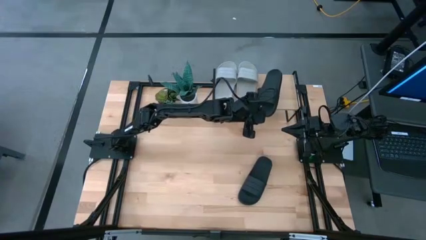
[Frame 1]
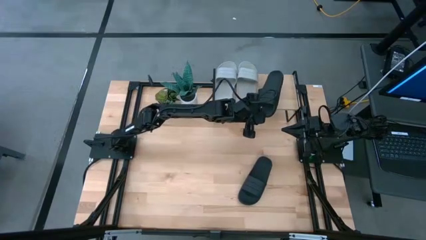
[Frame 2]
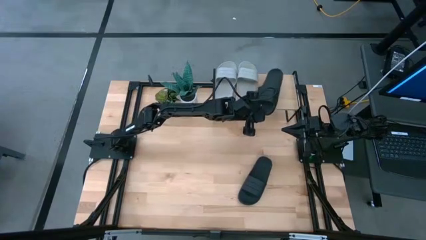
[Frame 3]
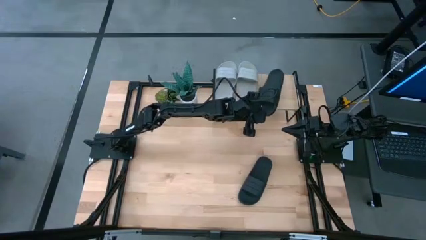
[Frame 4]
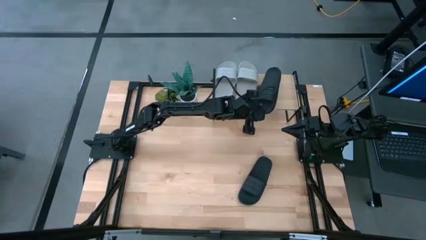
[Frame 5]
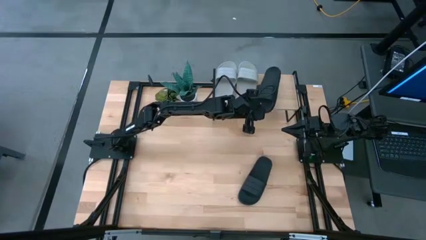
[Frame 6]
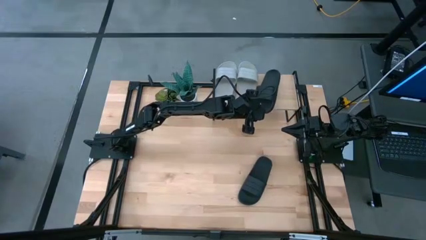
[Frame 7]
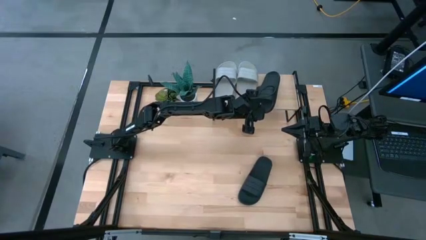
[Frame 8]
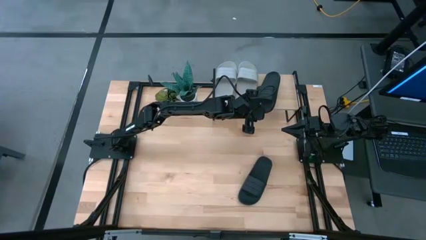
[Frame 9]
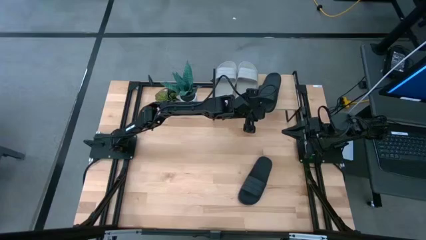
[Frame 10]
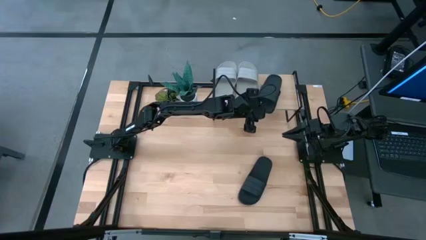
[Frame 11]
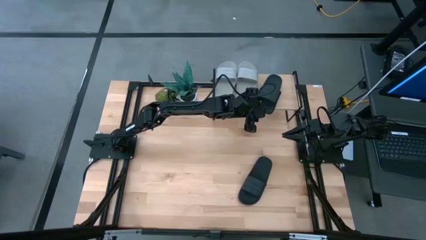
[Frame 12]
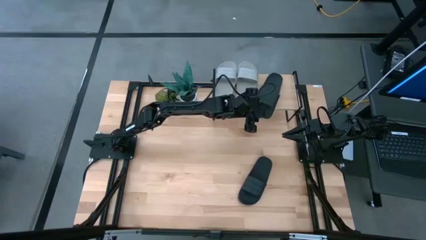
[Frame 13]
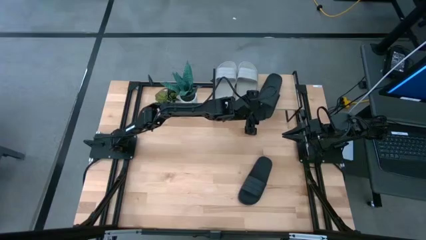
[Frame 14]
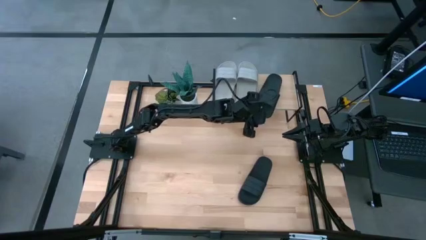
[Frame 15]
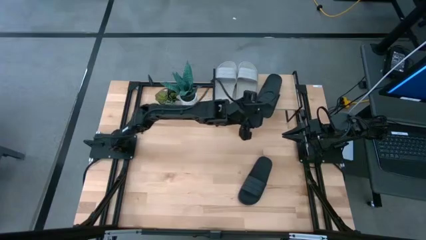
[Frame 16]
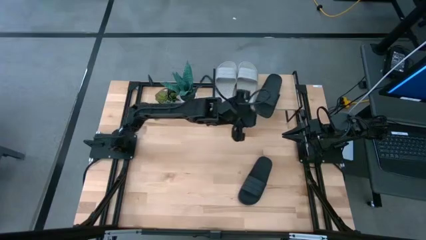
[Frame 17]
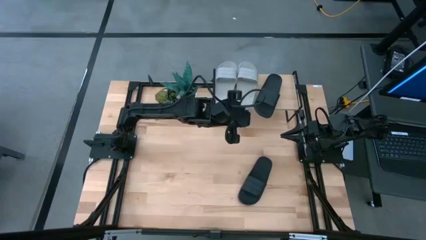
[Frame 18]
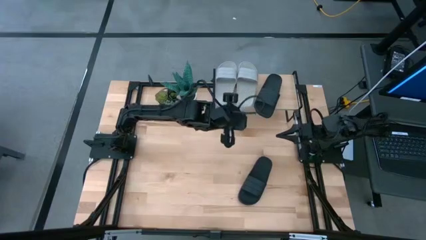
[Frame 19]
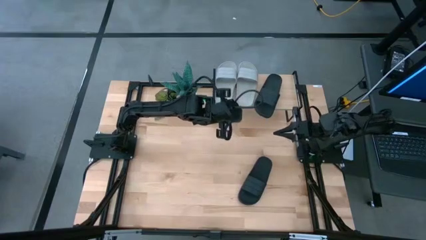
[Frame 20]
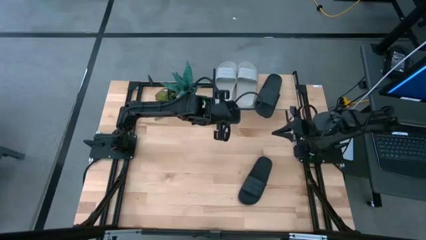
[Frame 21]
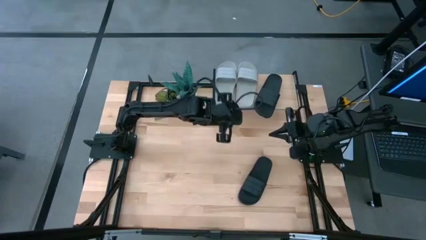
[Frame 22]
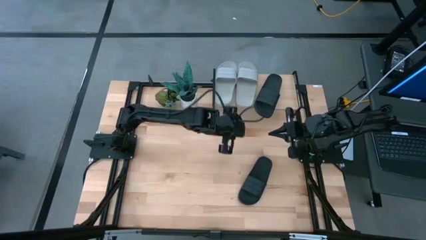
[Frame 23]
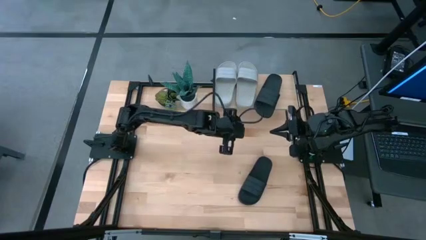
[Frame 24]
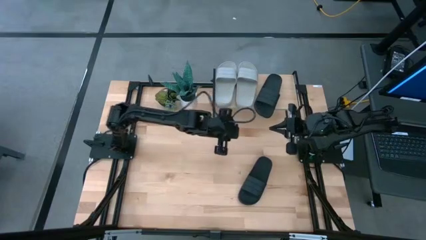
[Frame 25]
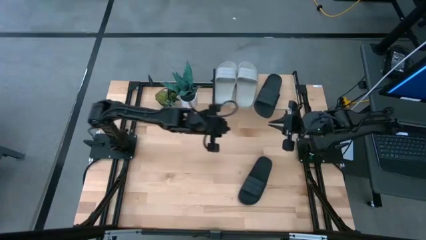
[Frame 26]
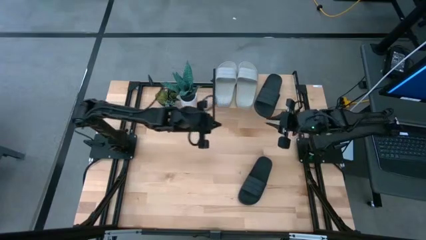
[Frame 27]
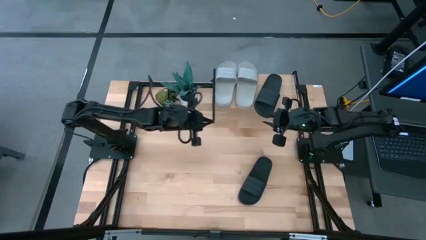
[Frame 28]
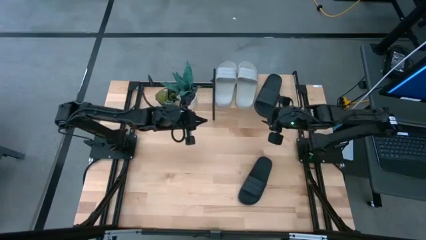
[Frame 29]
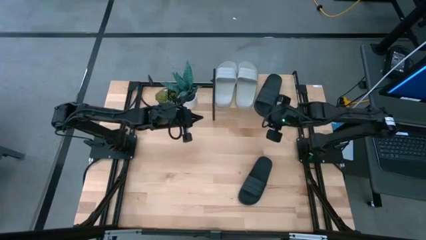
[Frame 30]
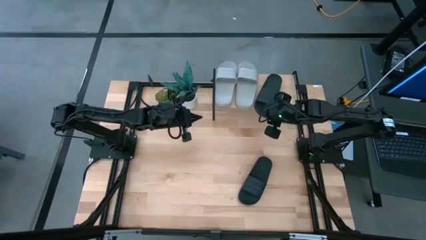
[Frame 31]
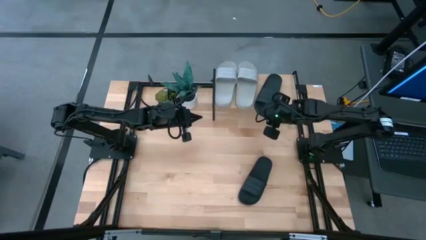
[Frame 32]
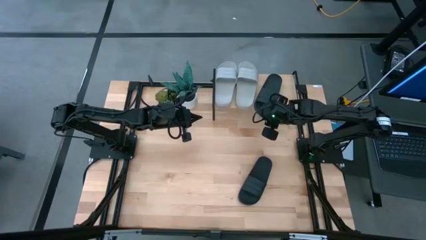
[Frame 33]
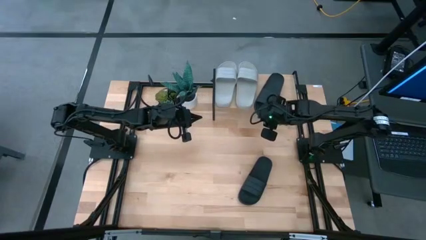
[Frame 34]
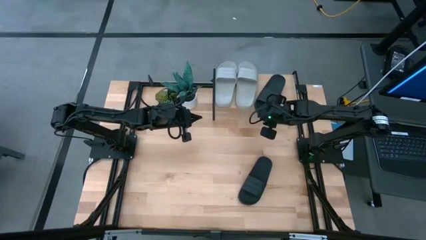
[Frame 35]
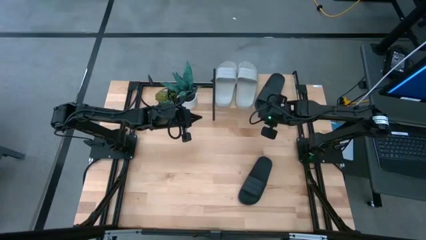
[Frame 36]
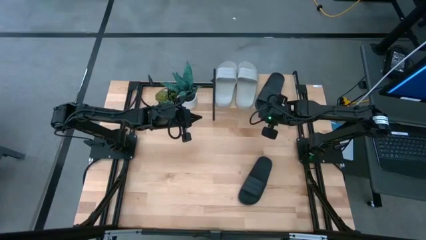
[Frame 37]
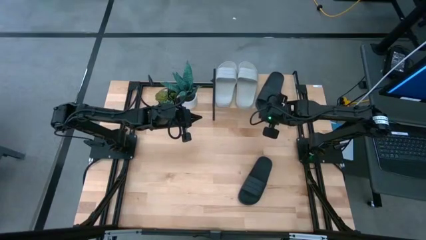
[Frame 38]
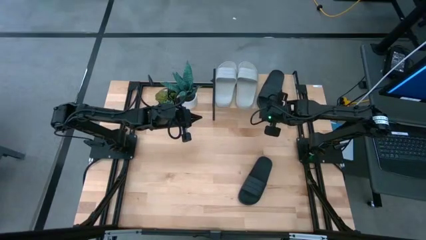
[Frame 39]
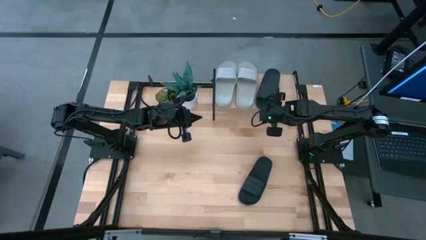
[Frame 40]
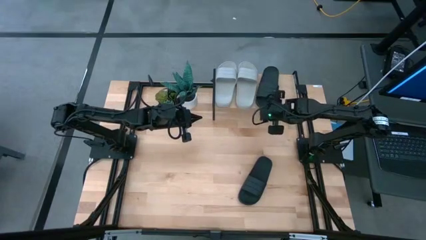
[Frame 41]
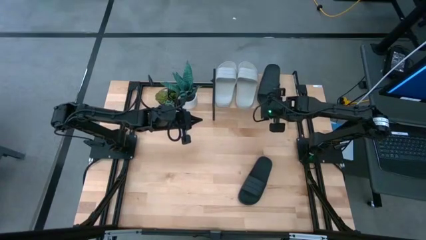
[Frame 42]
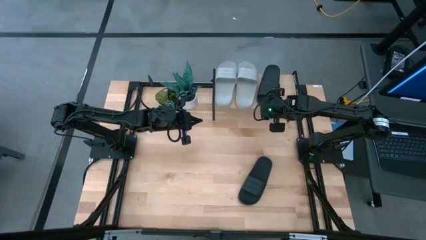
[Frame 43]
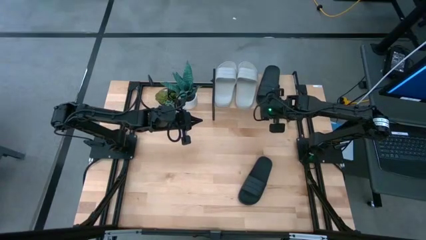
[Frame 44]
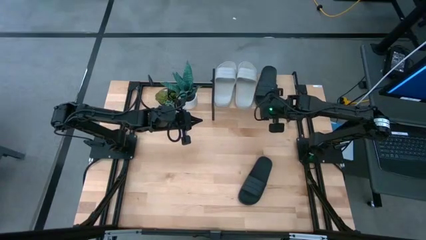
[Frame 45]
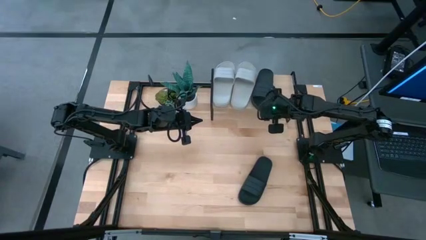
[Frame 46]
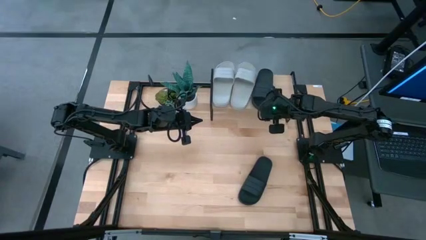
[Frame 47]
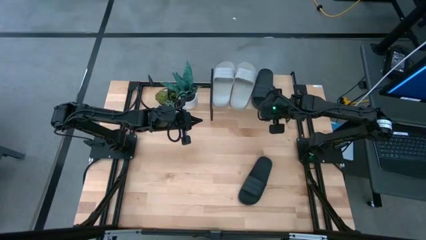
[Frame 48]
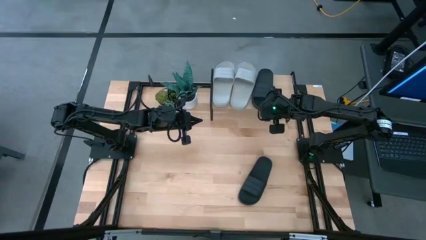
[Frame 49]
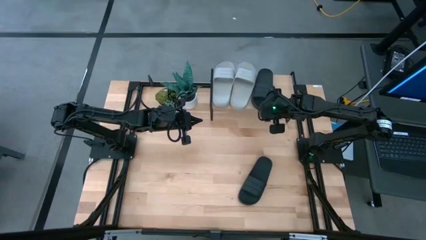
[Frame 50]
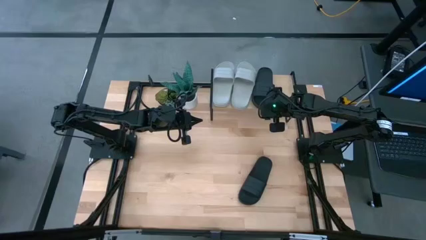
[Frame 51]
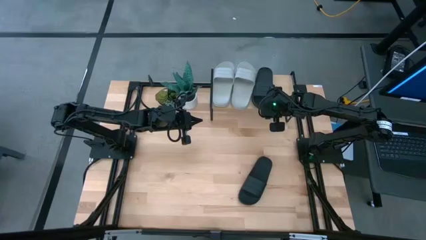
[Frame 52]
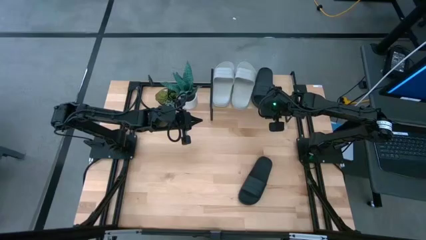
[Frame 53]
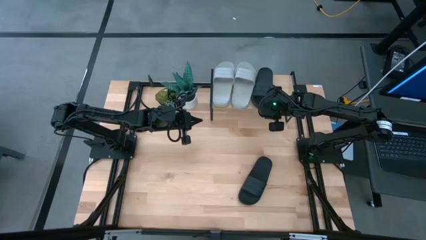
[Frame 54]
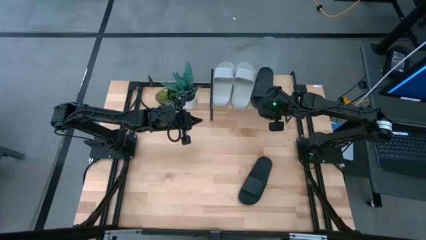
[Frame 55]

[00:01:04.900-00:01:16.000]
Task: Pick and place slides into the shelf
Put the top black slipper on the shelf

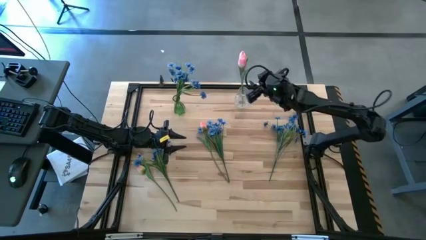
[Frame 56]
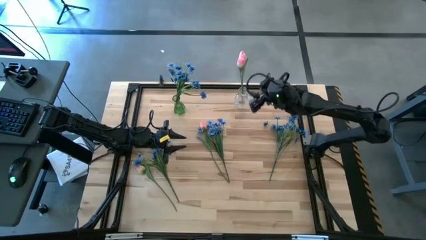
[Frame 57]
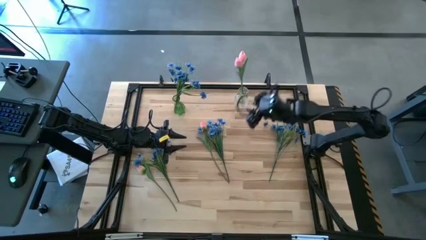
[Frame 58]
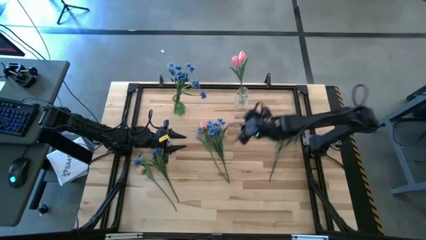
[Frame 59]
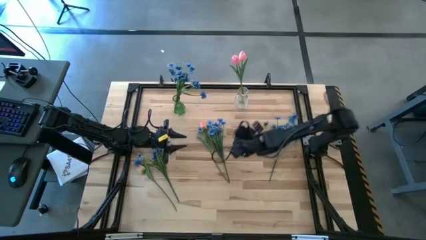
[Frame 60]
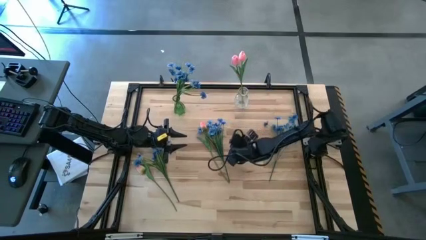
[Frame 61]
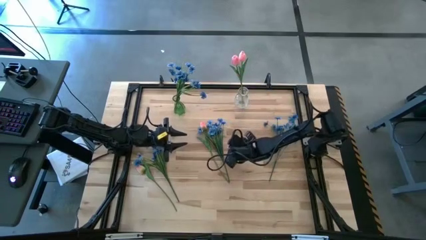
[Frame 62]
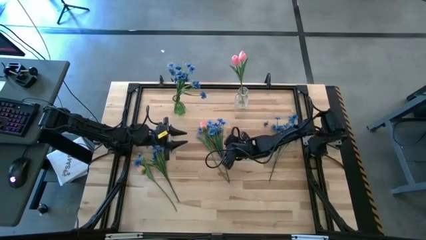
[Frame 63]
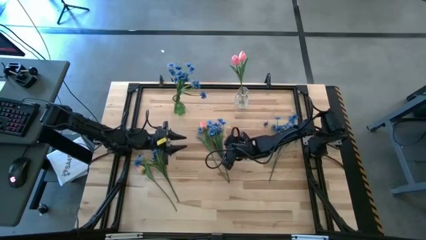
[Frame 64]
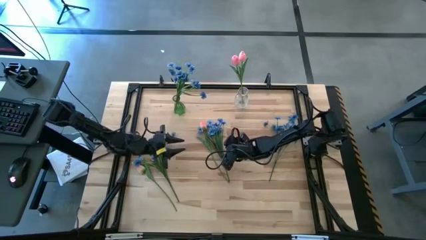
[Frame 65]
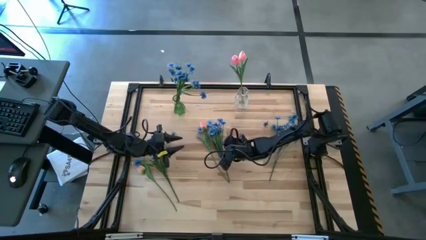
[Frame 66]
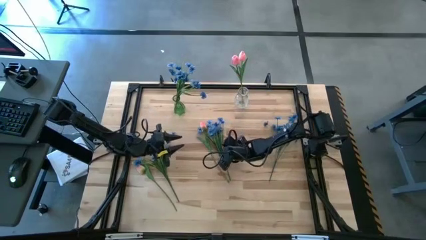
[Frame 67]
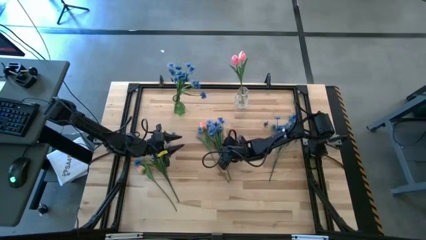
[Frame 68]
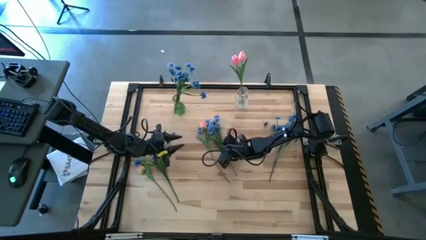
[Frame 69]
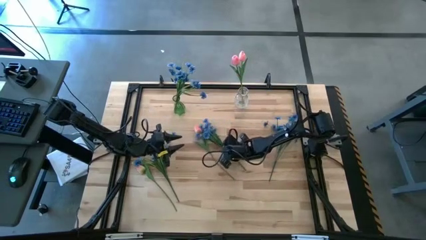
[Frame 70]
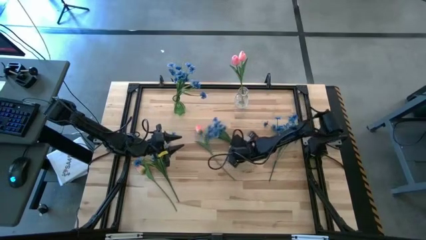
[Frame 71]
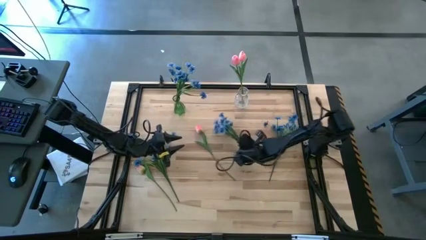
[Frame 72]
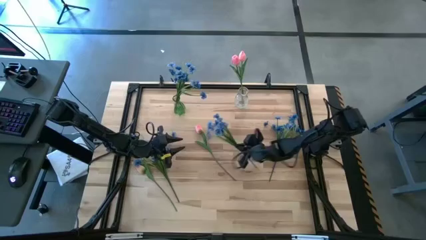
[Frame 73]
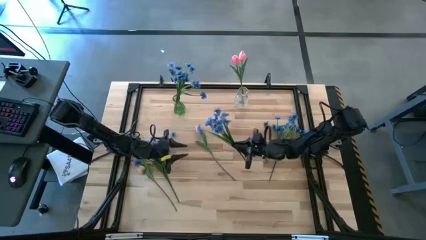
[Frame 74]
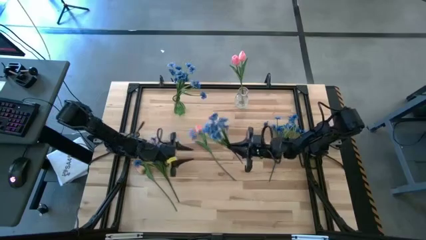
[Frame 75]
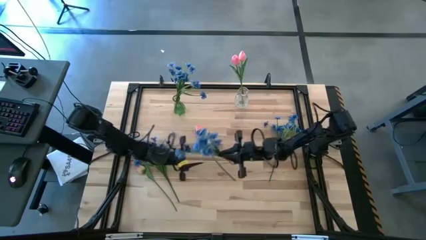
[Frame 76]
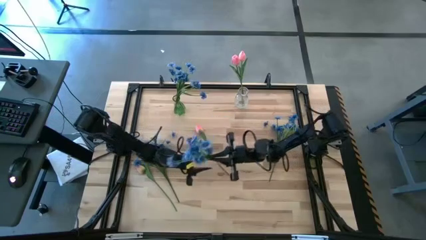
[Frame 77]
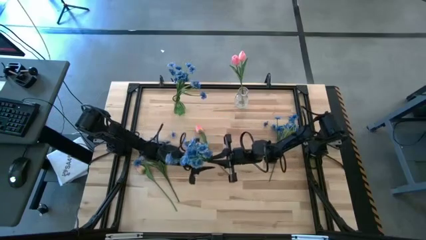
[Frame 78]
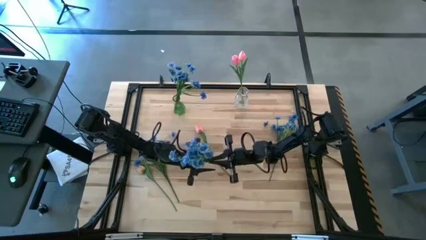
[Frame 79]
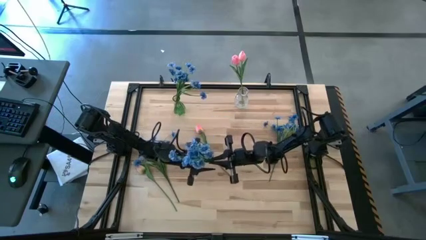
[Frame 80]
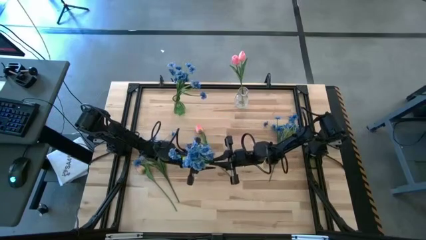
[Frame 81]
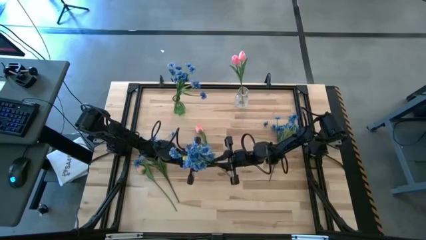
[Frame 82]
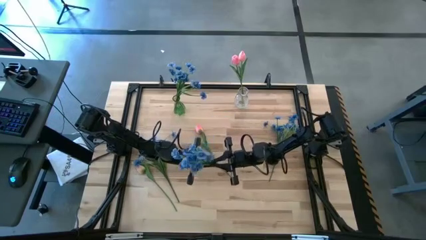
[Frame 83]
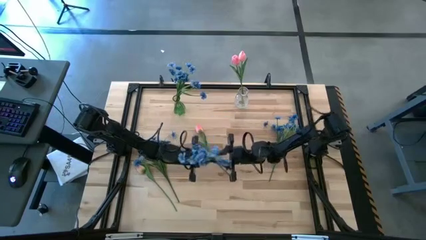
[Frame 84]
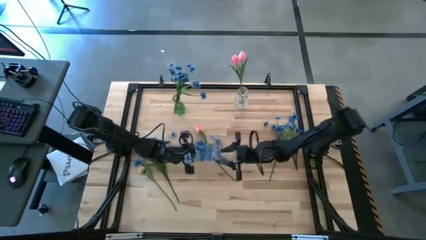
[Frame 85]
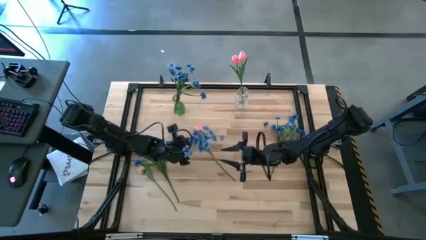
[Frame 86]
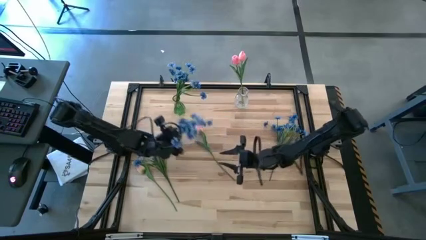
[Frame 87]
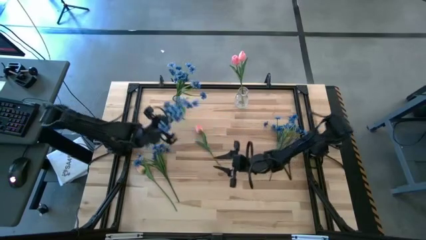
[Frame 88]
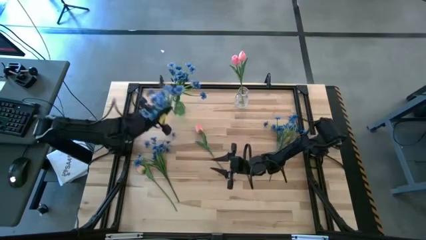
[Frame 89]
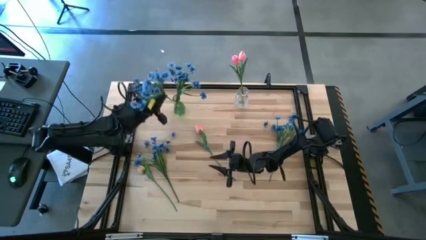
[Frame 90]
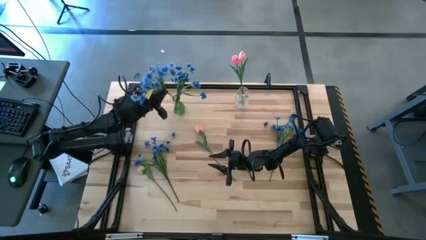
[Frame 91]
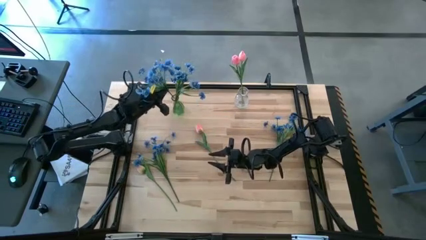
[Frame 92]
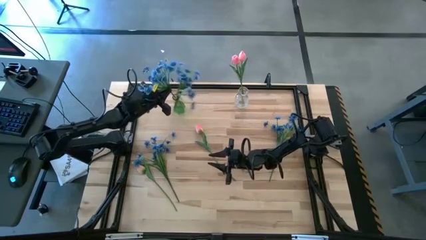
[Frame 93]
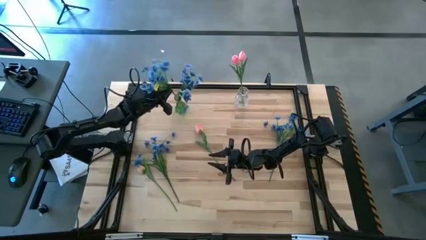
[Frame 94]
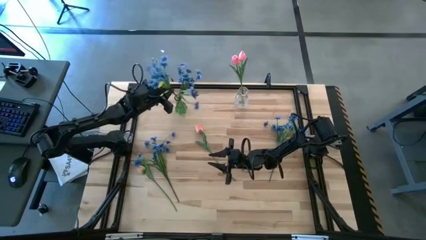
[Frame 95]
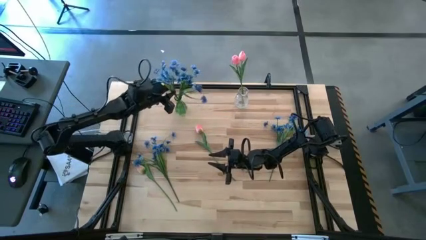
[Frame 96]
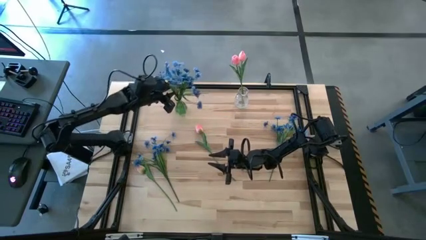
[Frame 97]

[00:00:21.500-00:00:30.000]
Task: Sort flowers into vase by color
Put the middle blue flowers into the green vase
